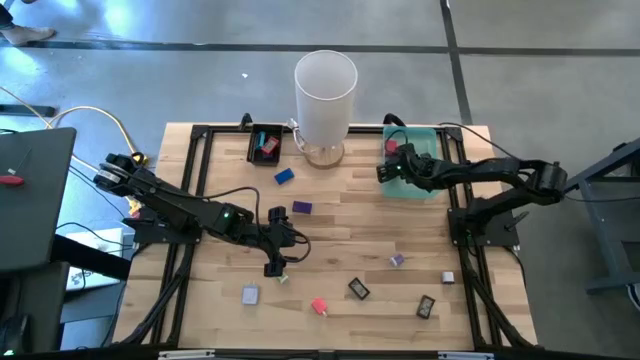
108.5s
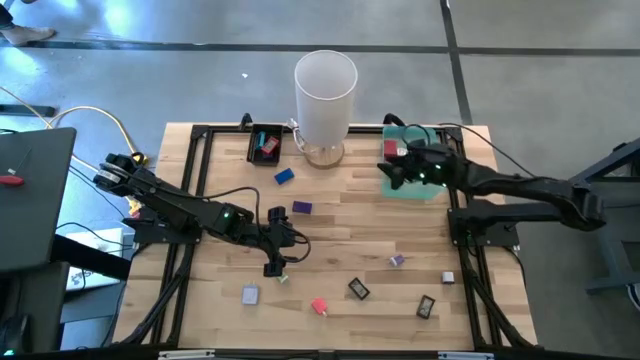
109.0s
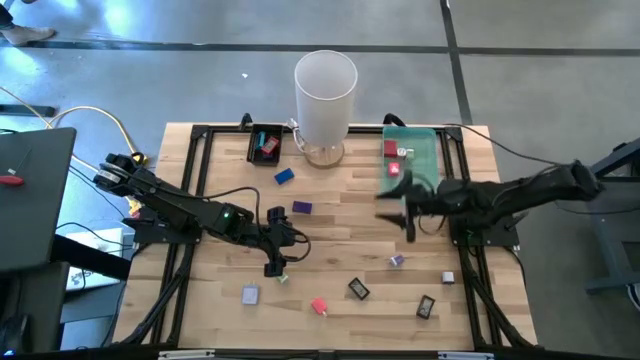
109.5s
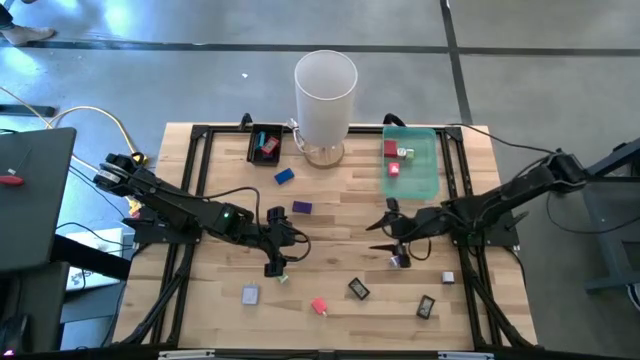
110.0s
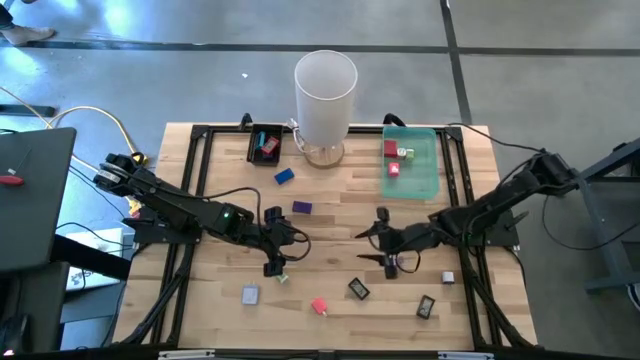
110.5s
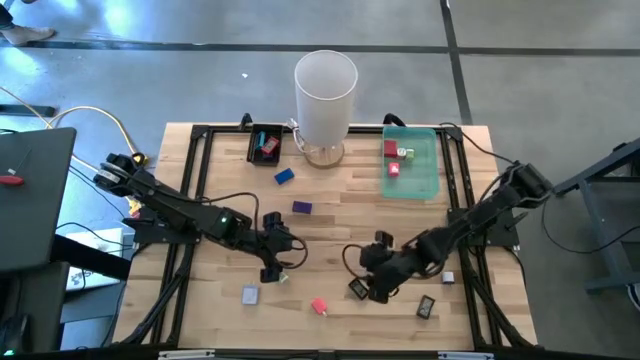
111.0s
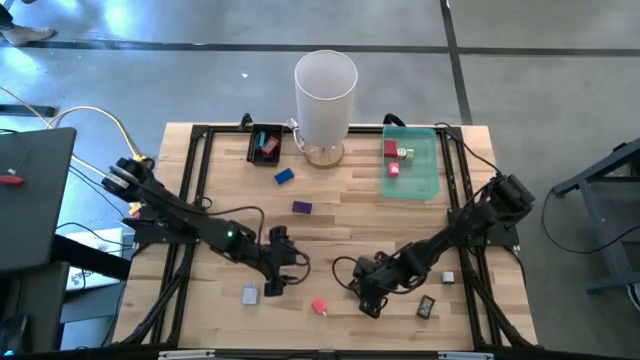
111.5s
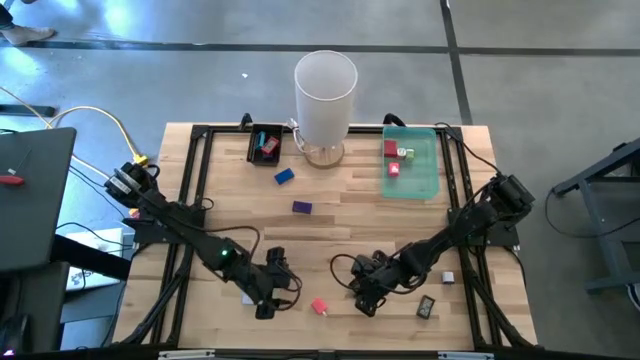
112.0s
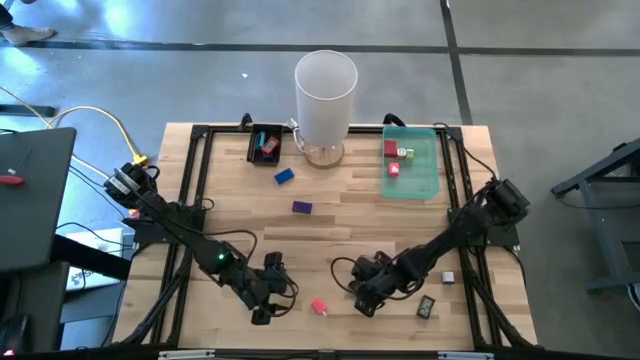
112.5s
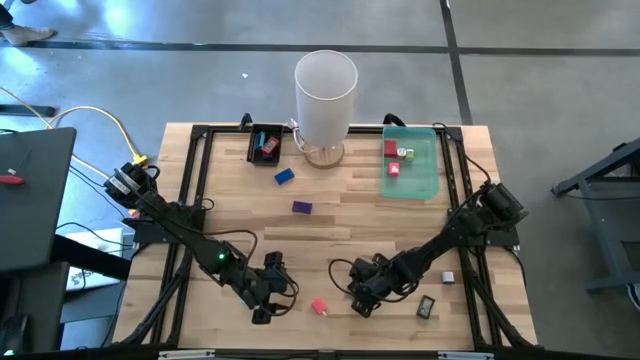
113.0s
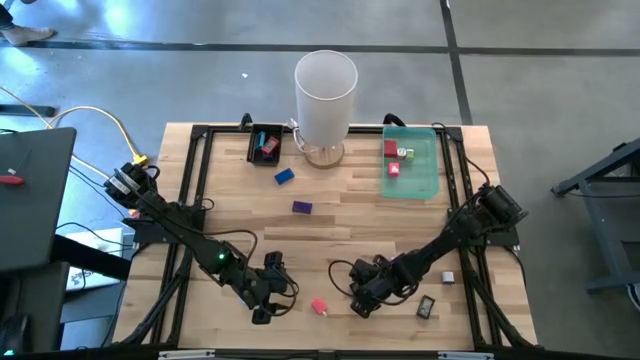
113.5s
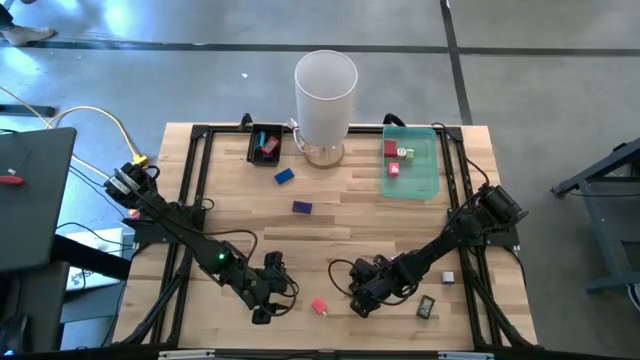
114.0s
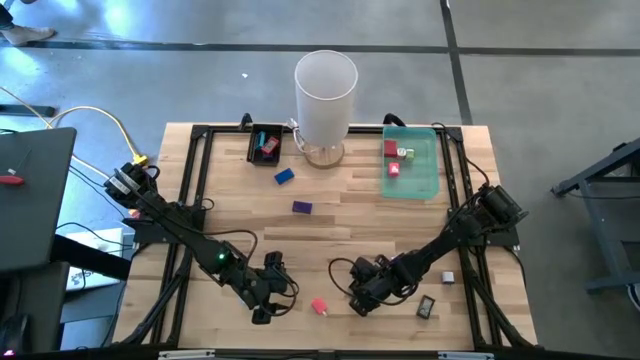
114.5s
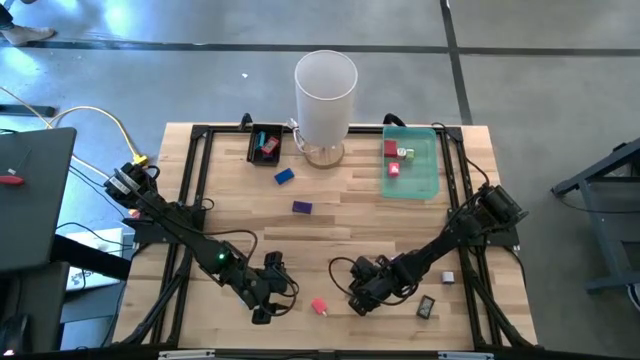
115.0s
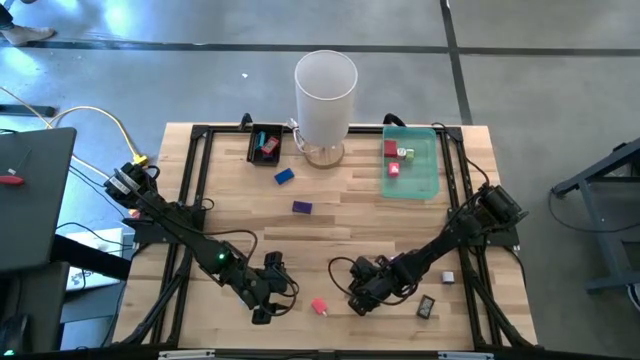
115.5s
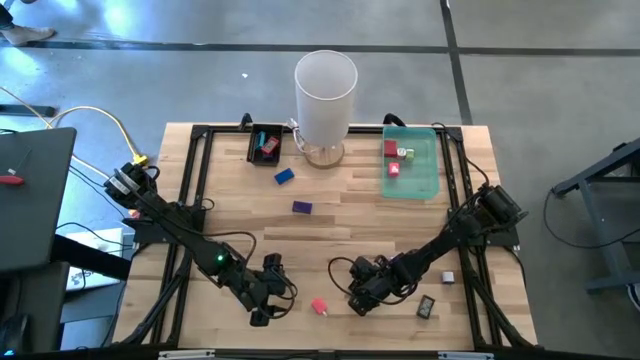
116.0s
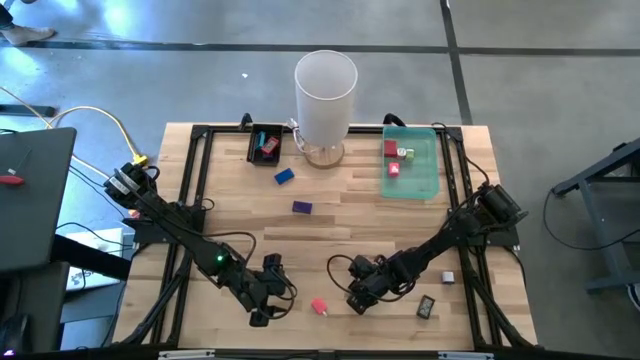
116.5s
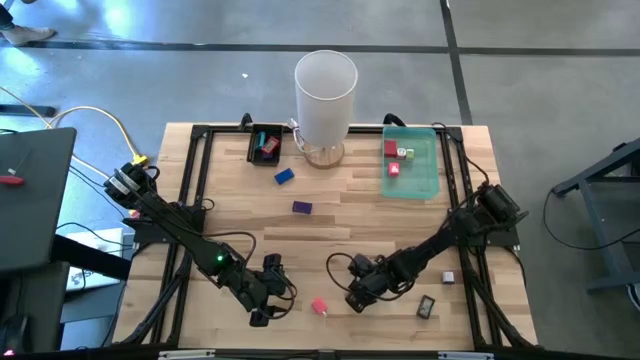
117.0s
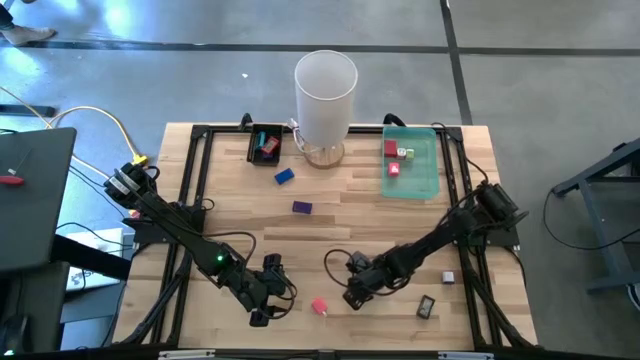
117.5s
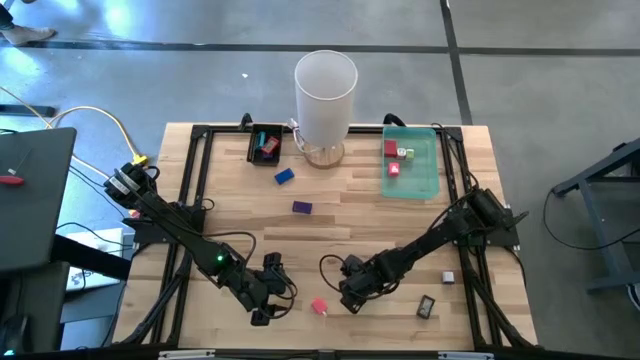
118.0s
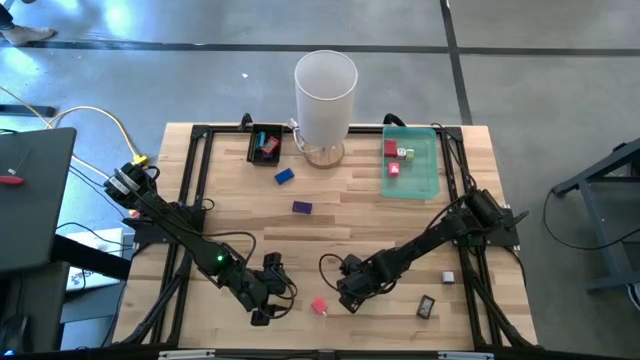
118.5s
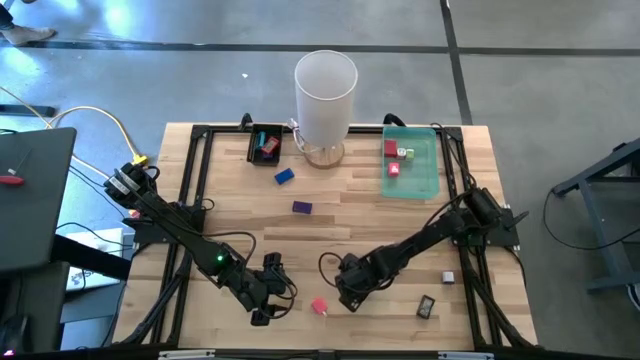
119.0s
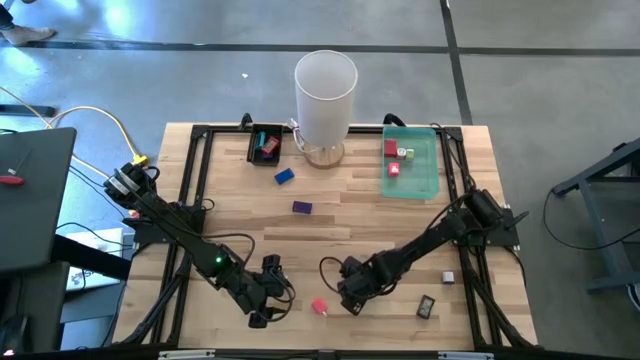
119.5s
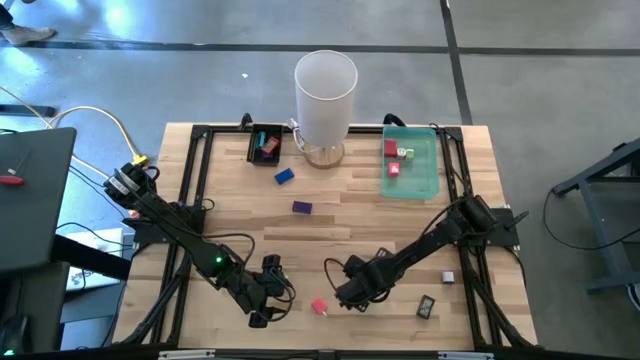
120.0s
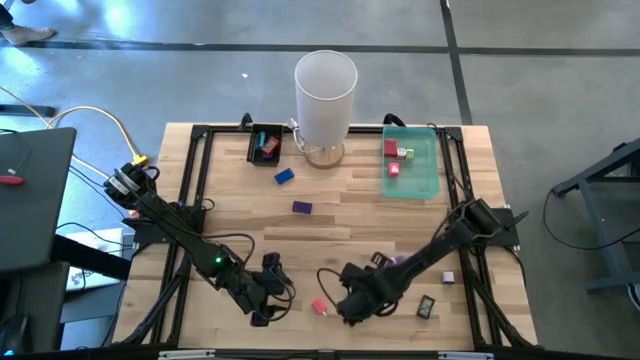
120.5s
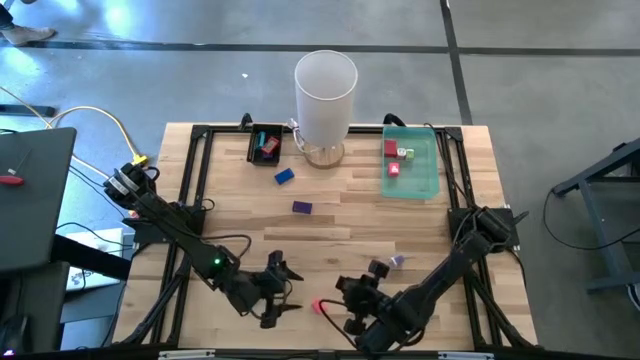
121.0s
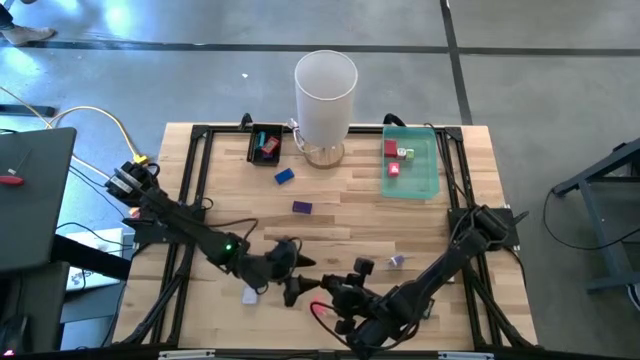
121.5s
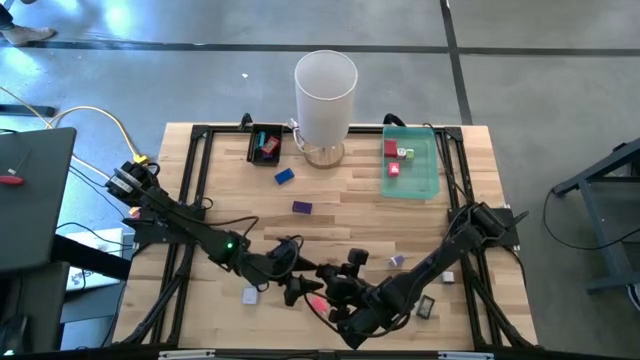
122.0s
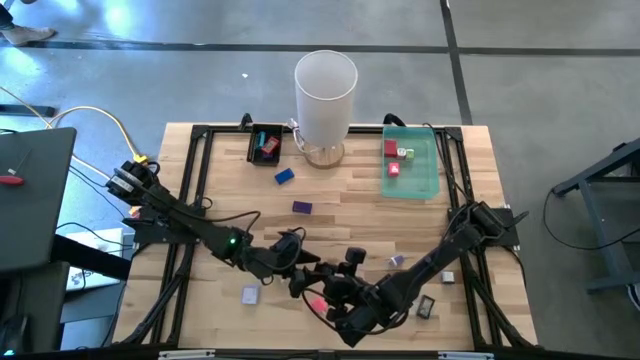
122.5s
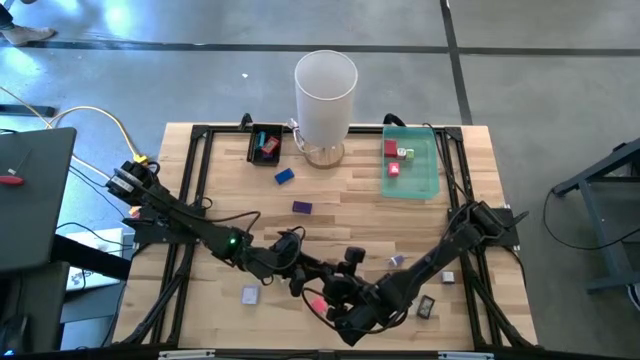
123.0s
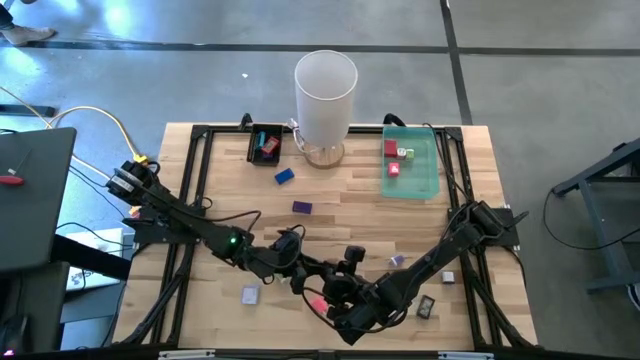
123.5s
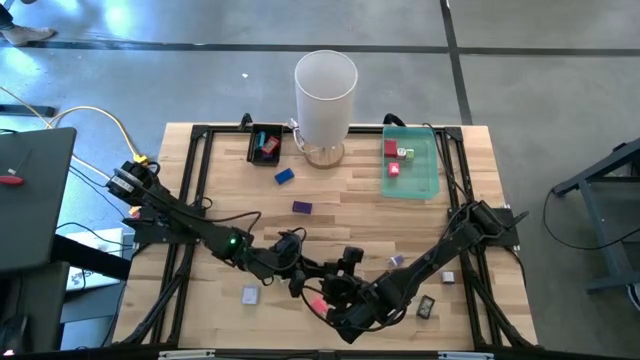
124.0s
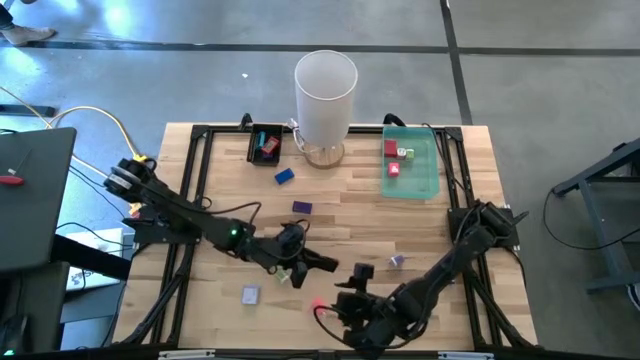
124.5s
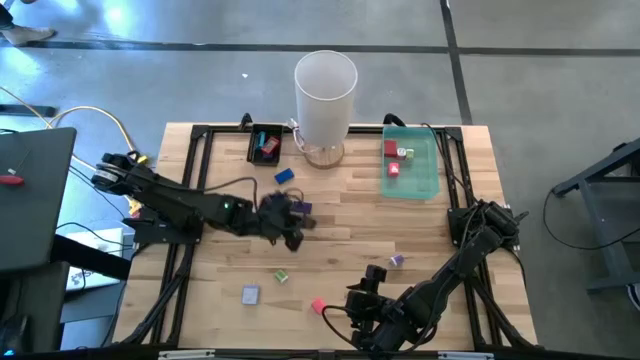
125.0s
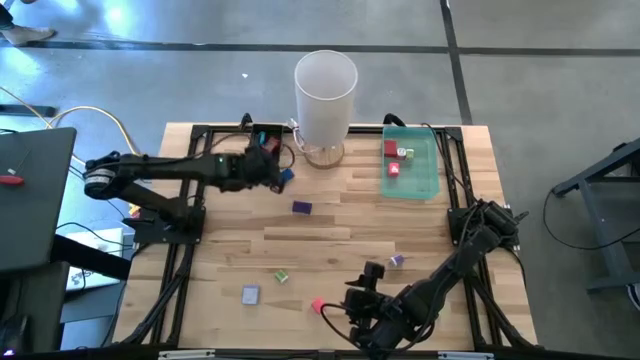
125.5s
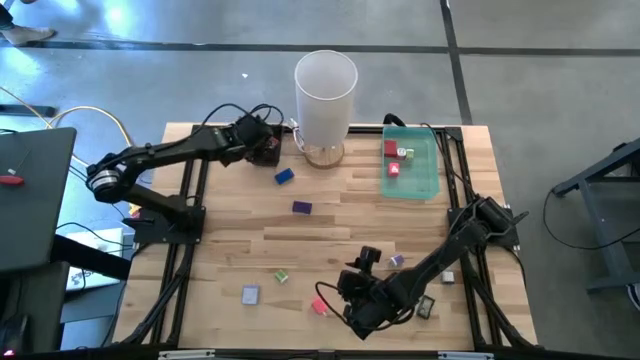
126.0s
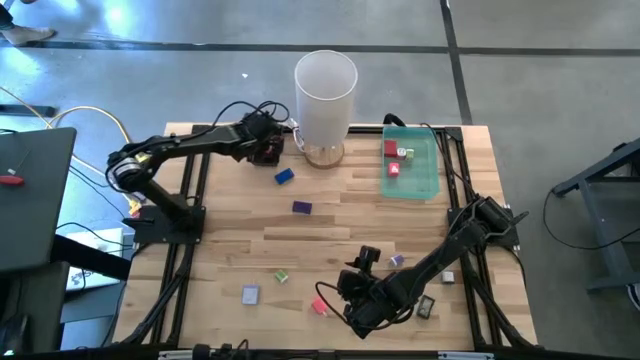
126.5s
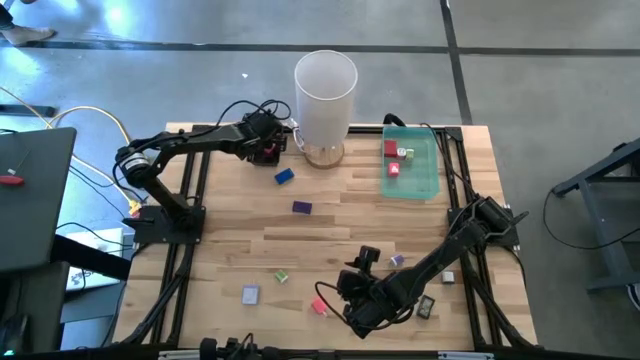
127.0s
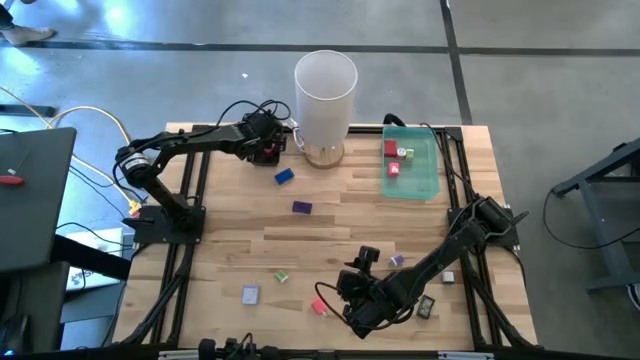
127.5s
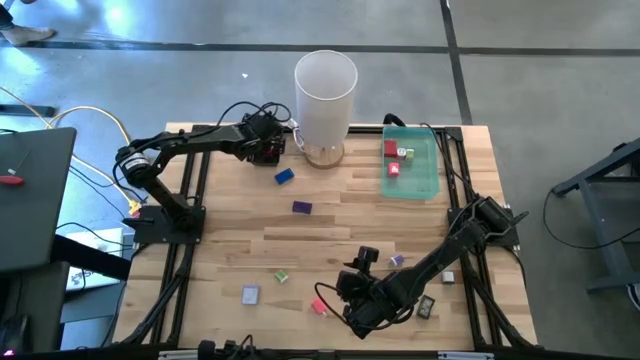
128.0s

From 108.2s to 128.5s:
Task: Pick & Place Office items
Put the left black digital clock into the black bin
